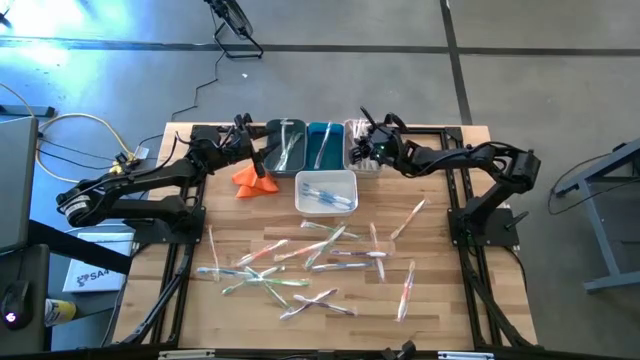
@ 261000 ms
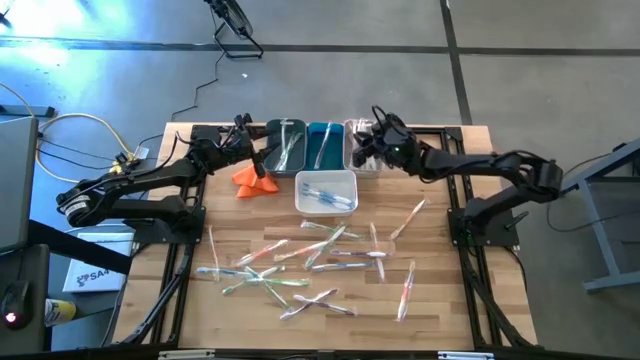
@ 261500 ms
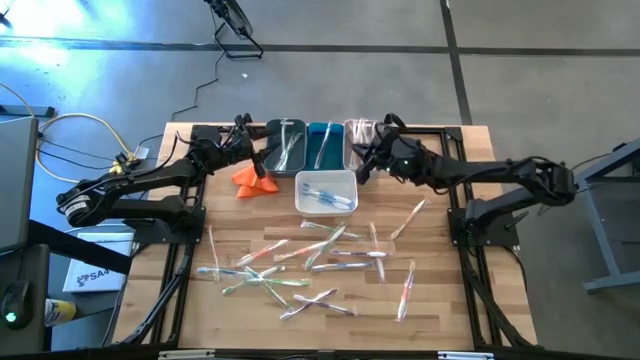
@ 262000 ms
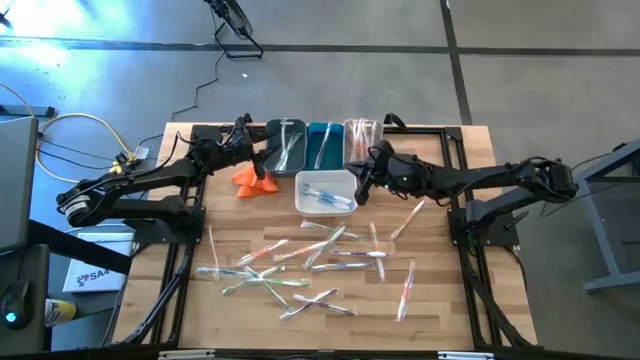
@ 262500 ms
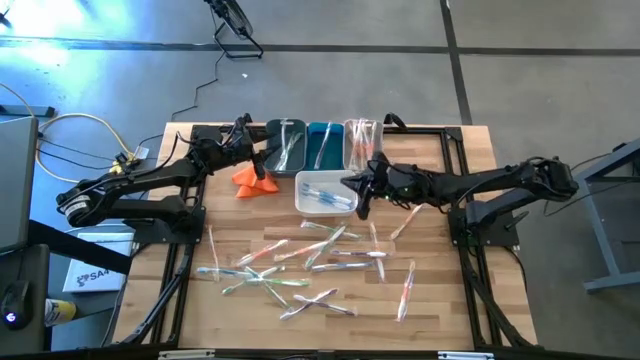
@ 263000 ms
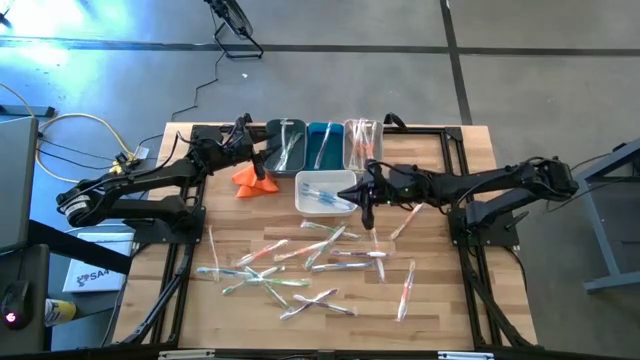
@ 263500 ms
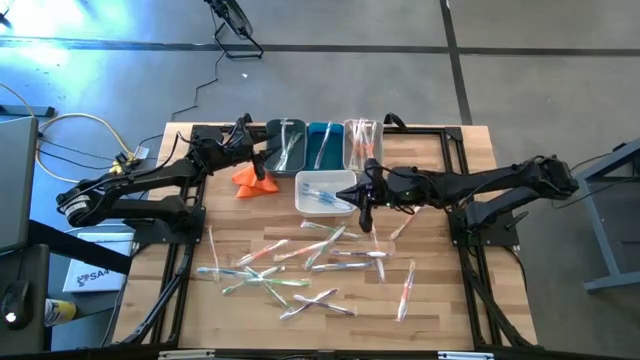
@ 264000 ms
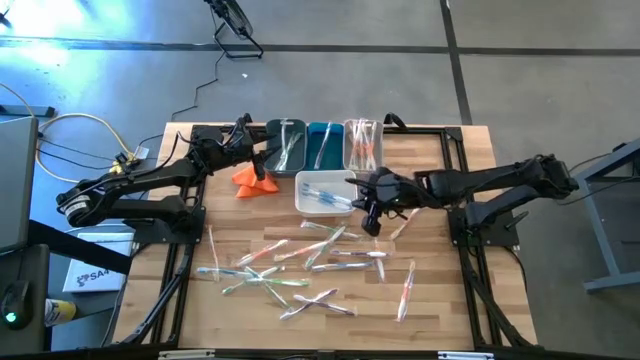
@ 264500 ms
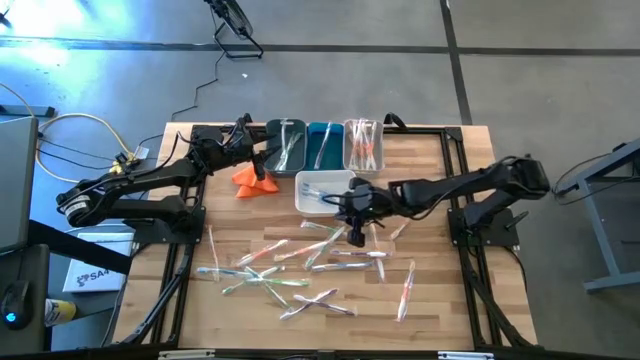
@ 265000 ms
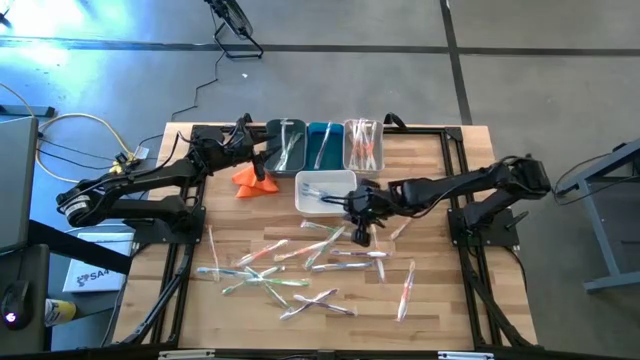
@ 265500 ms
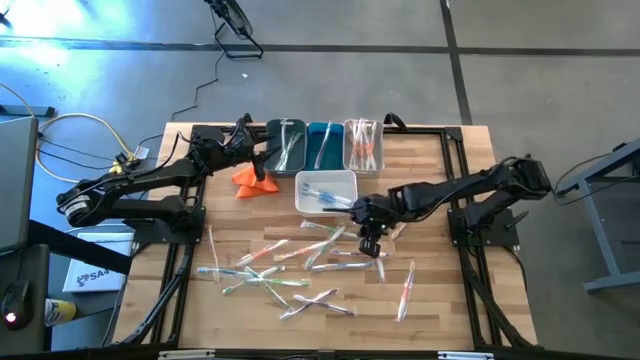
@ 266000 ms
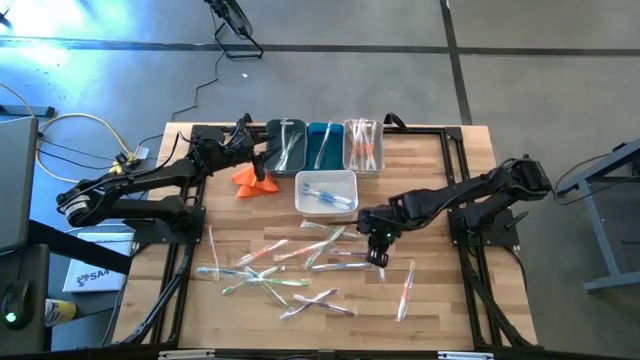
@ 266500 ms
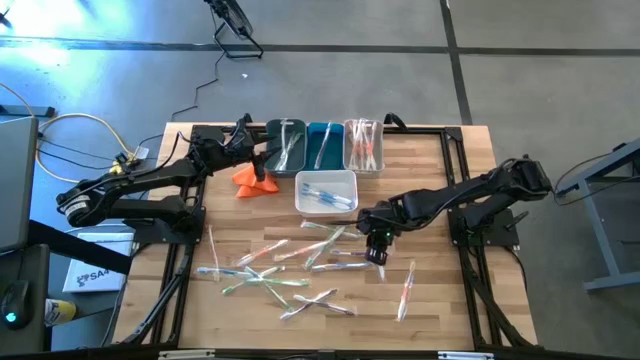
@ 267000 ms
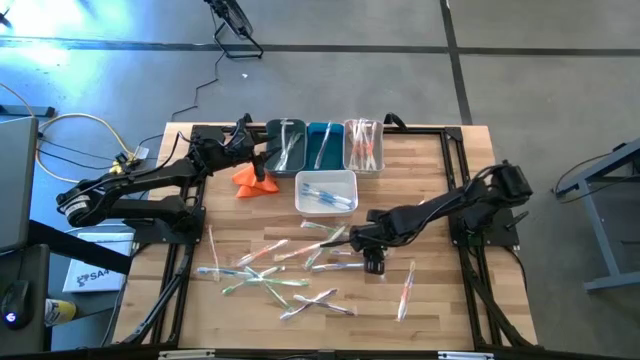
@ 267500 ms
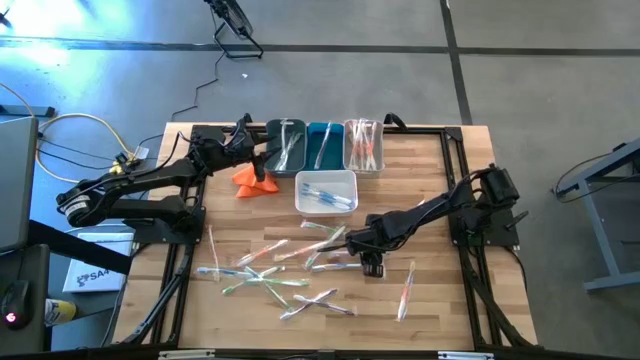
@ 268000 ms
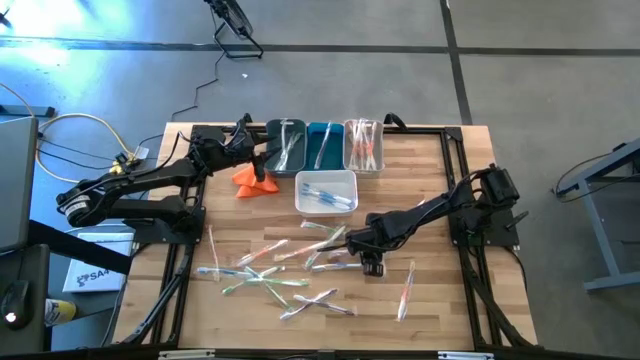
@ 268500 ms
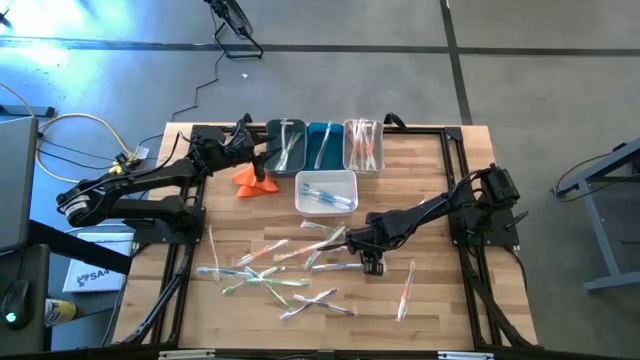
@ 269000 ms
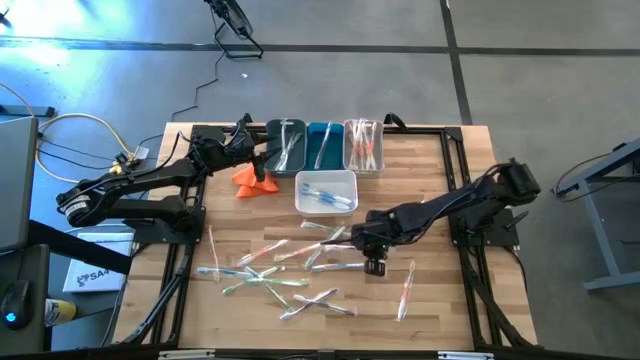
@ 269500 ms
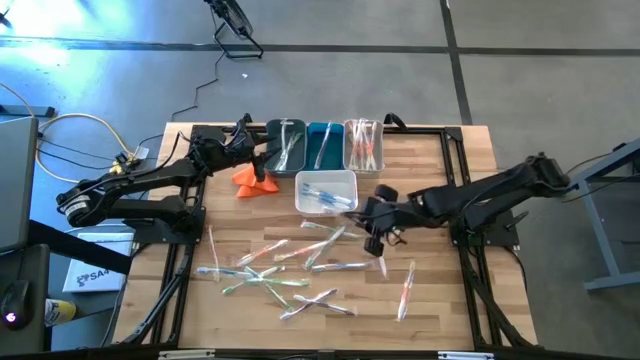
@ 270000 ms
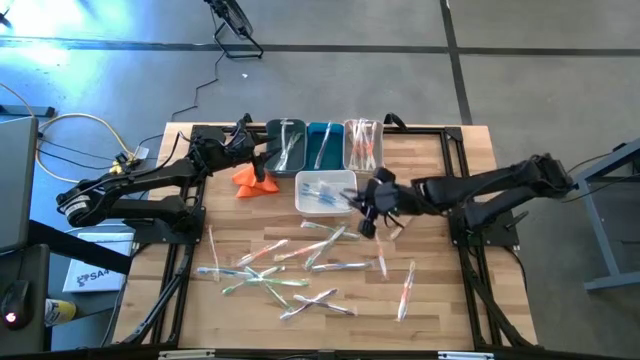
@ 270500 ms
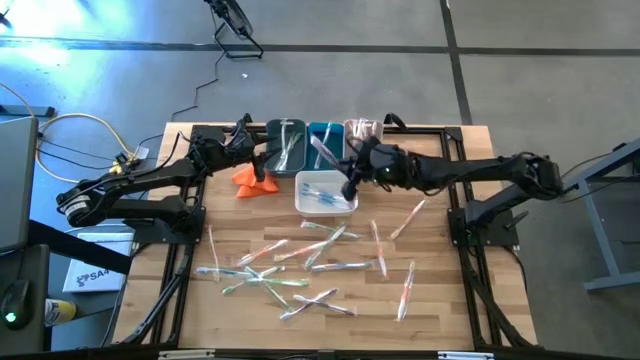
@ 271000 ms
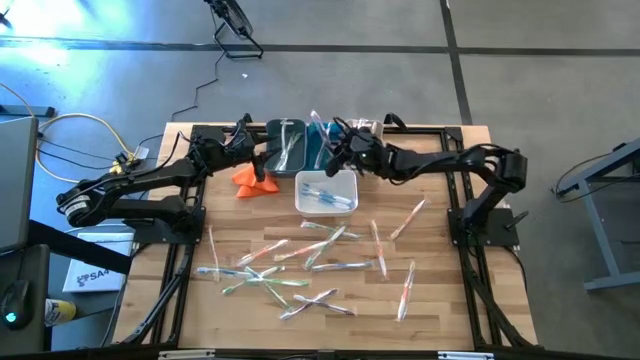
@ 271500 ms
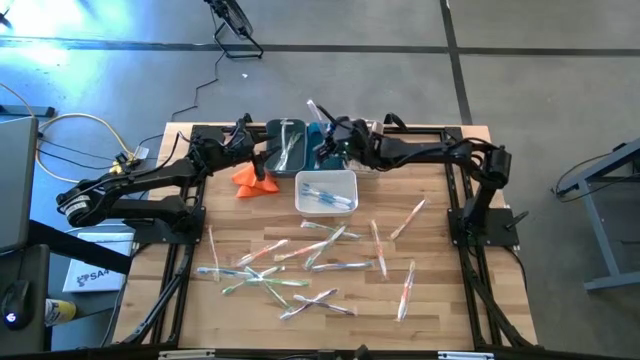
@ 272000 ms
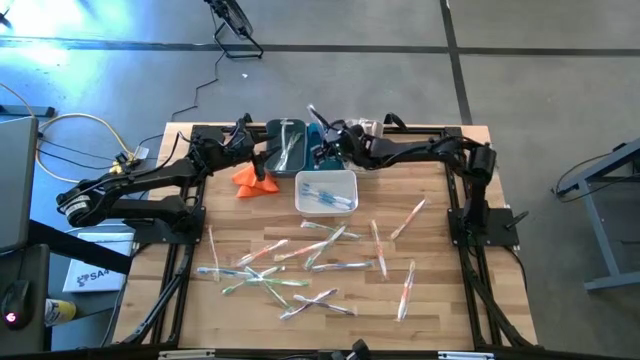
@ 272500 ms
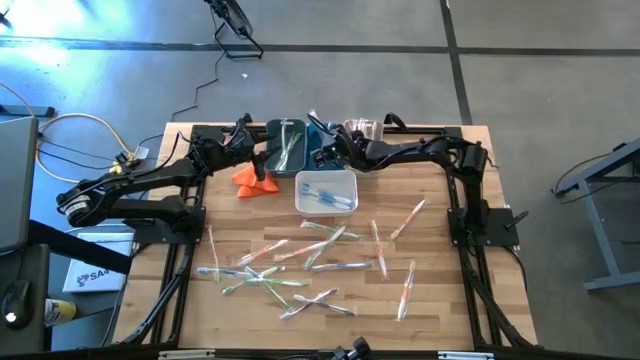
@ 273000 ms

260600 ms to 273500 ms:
Task: Pick & Place Toothbrushes
Put the purple toothbrush into the blue bin

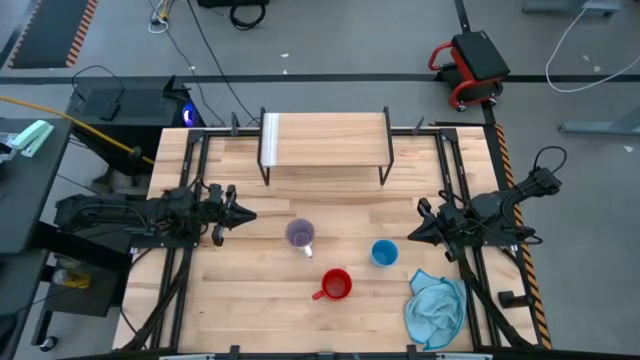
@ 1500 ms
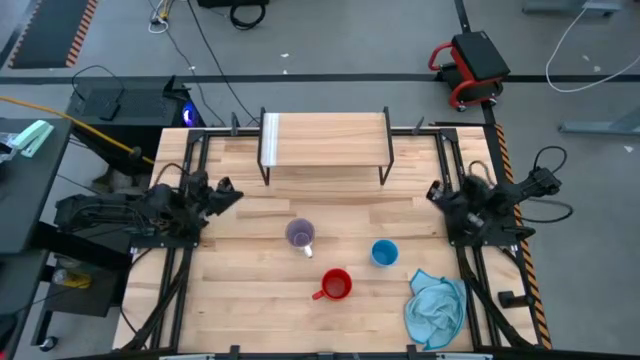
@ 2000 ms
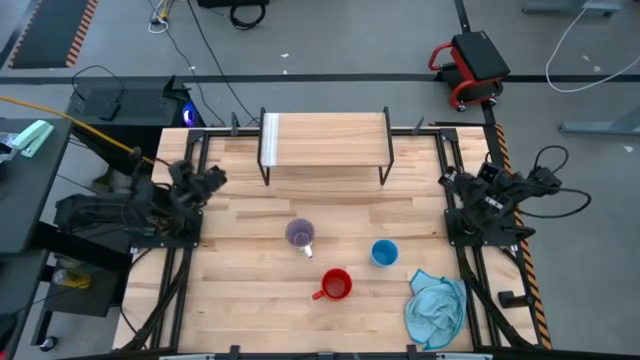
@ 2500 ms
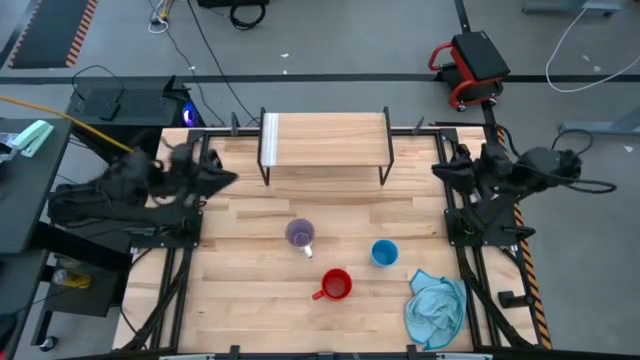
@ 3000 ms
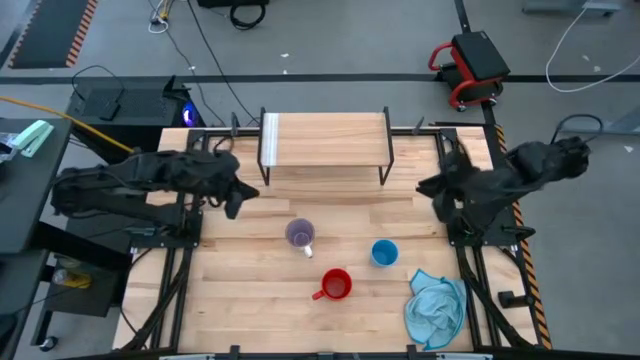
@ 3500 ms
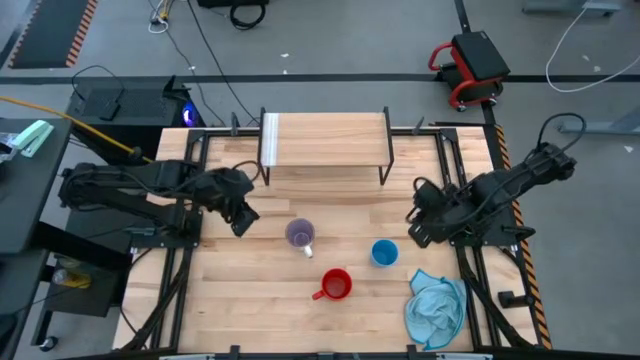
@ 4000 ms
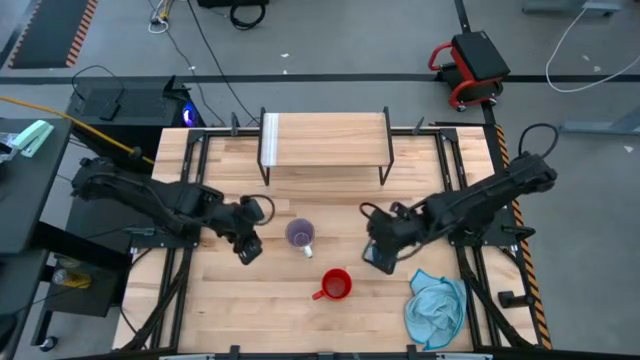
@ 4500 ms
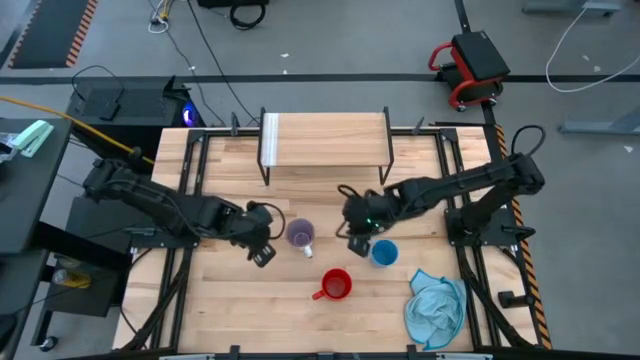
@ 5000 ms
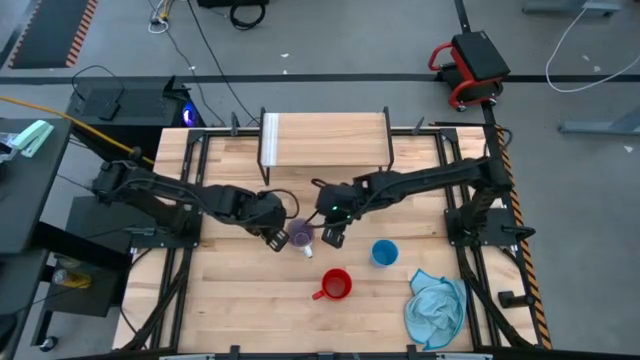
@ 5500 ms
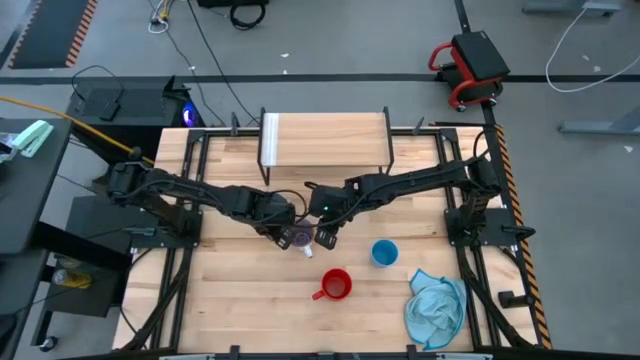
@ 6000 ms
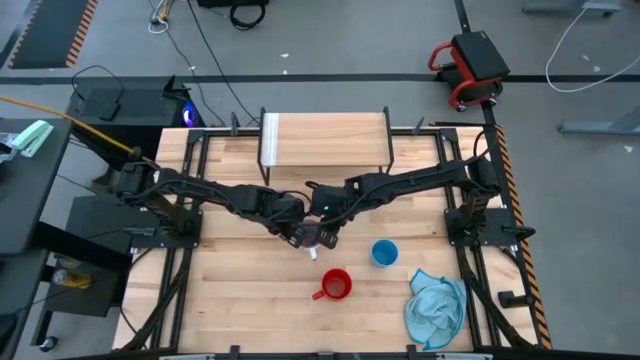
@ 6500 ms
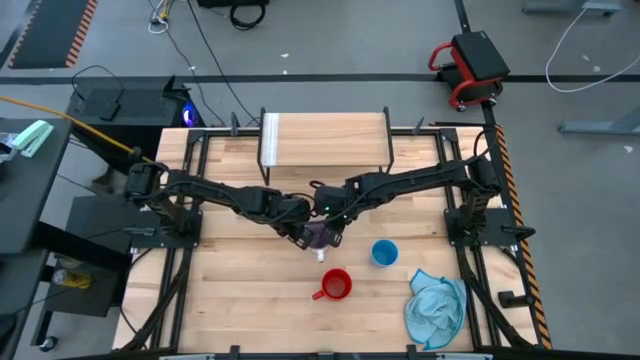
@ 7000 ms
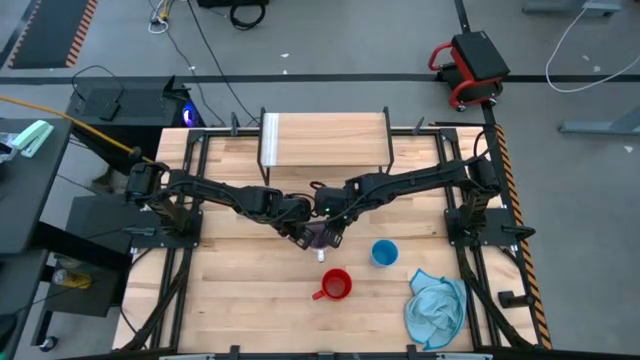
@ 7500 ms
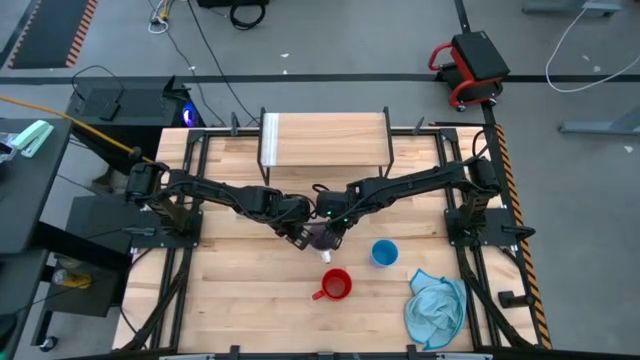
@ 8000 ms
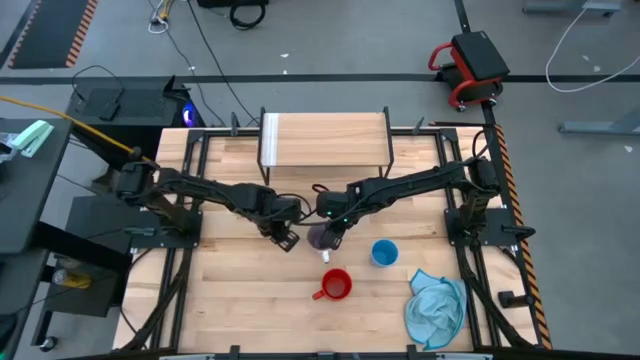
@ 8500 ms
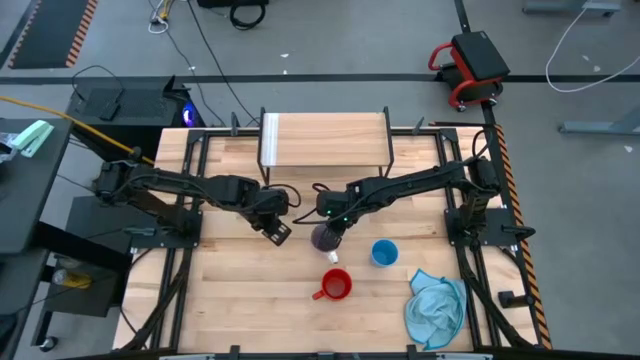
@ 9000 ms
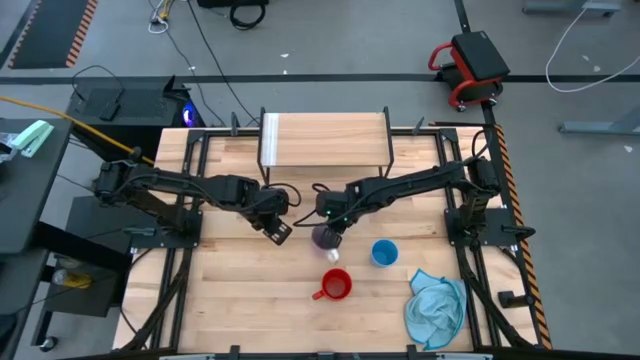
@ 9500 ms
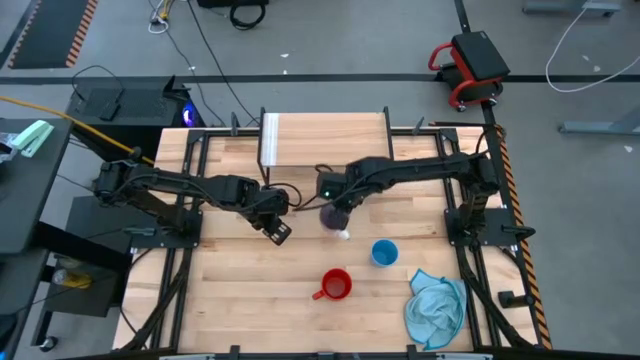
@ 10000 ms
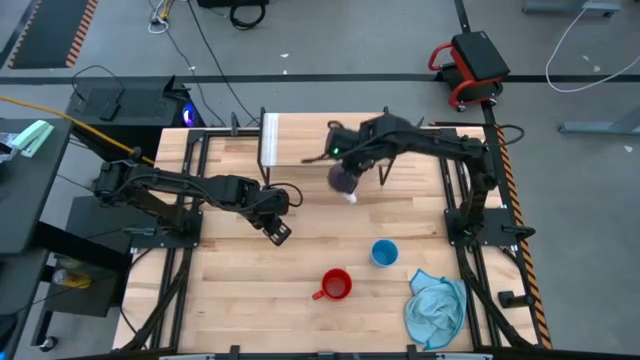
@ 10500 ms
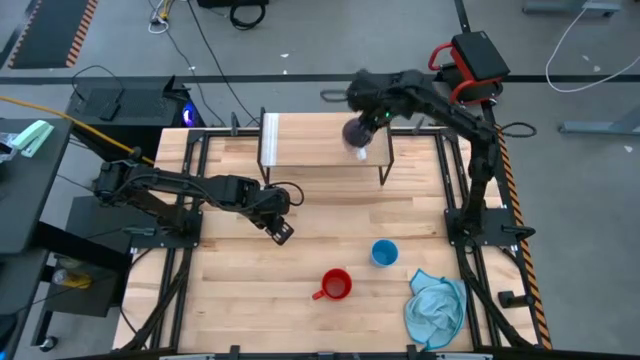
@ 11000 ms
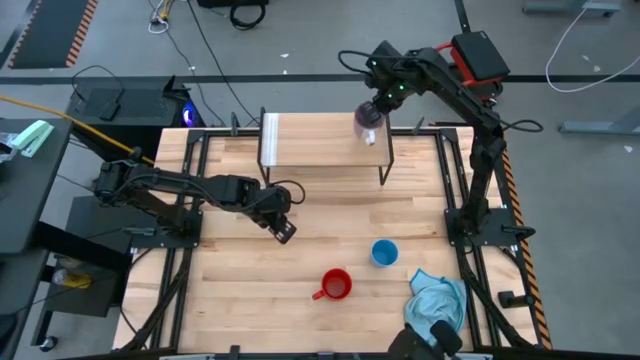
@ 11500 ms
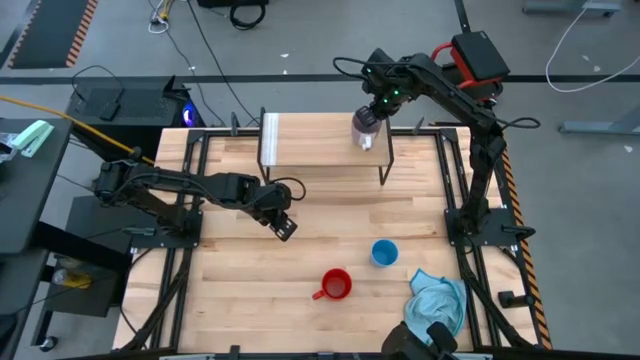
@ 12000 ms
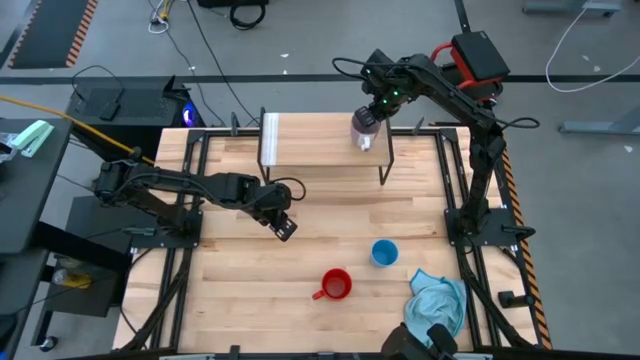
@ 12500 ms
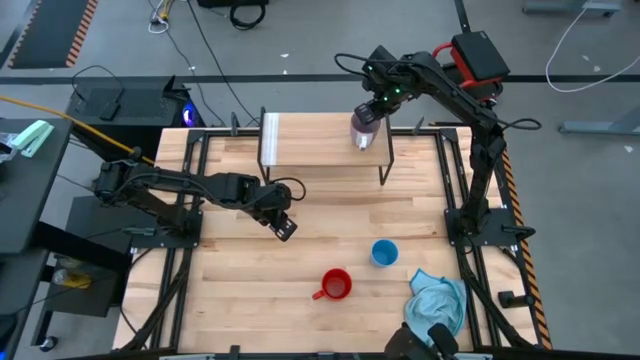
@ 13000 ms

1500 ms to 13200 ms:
Task: Stack small to large cups/mugs on shelf
Put the purple cup on the shelf
